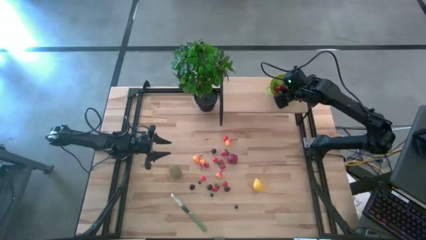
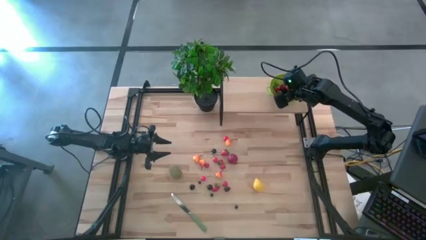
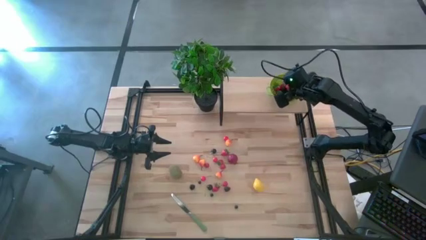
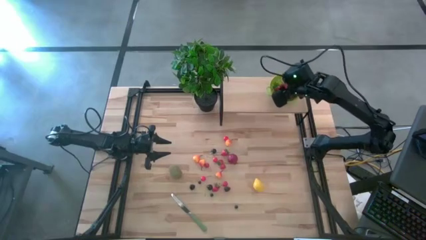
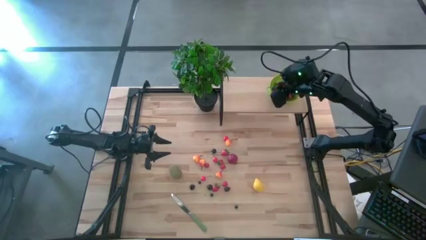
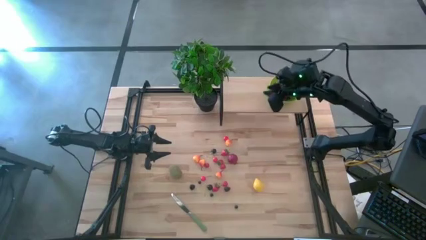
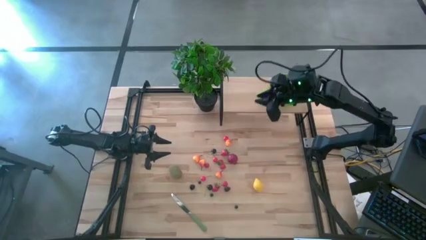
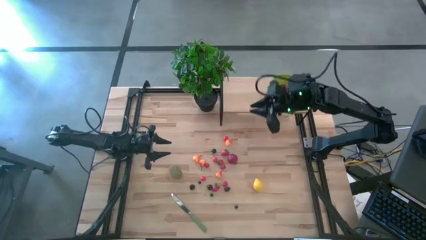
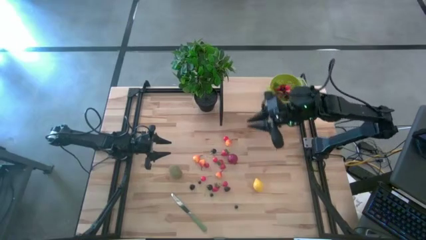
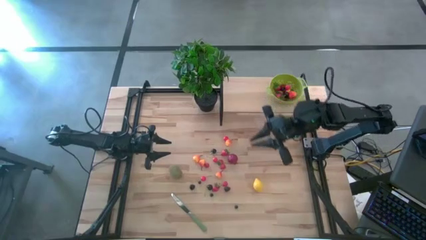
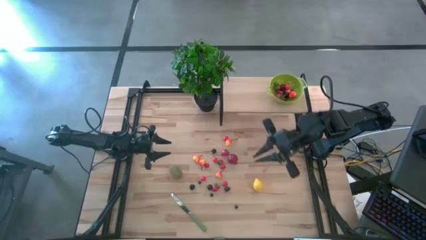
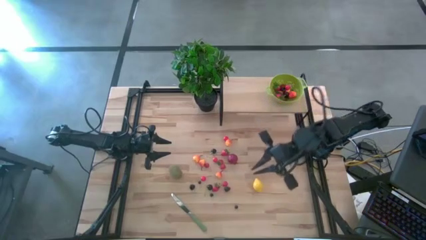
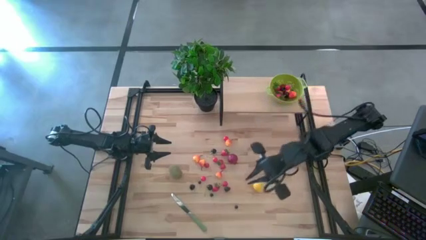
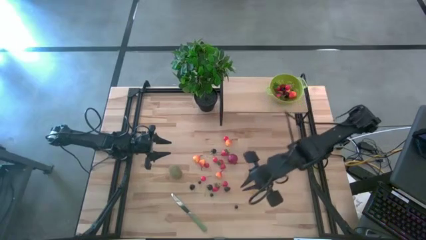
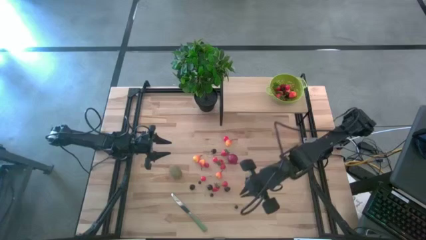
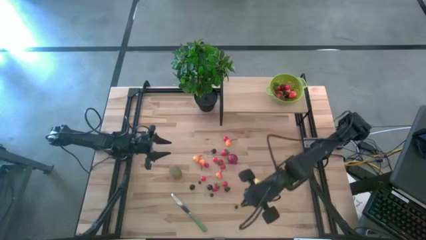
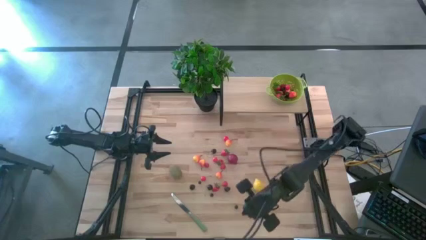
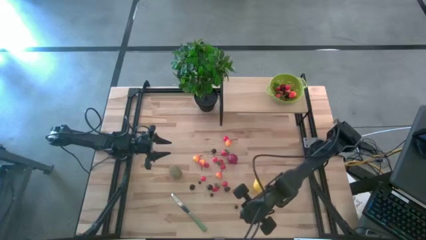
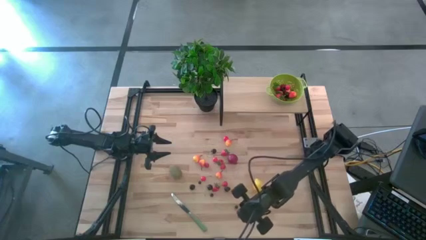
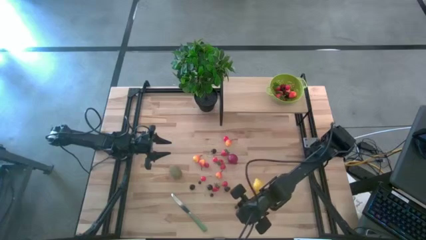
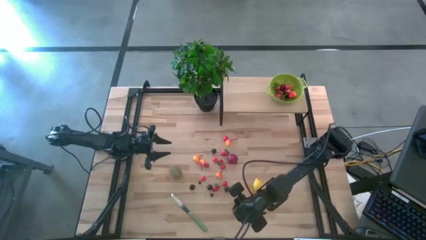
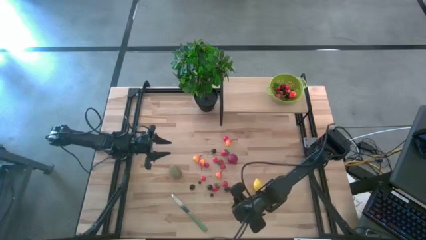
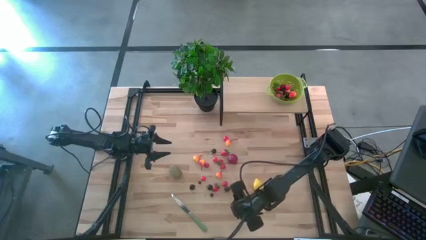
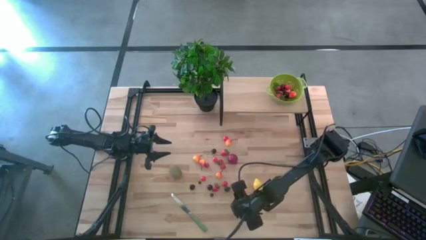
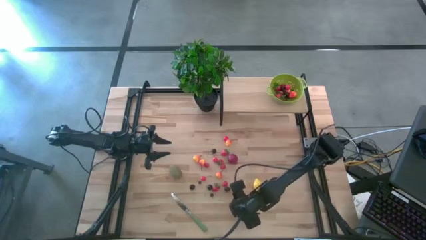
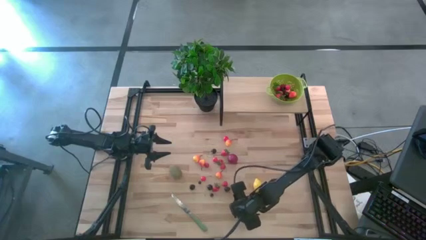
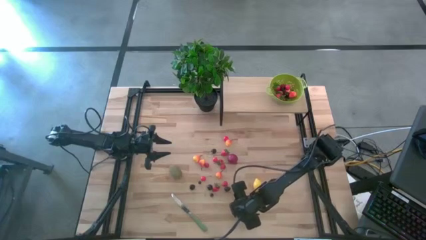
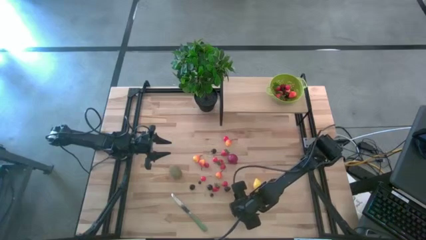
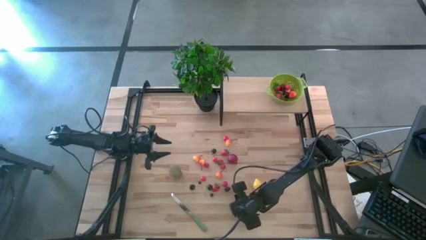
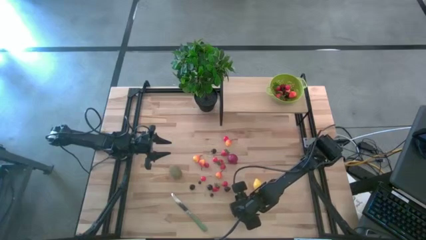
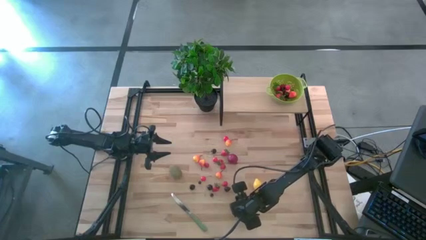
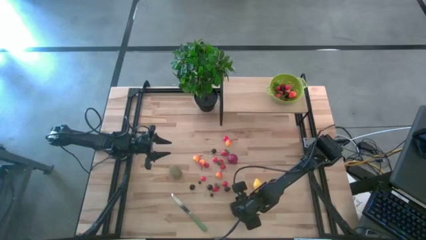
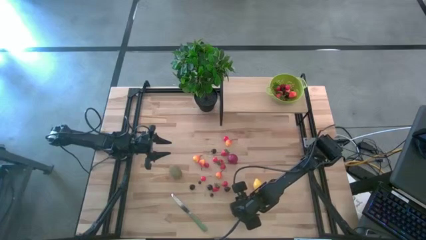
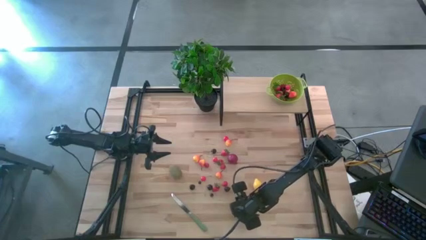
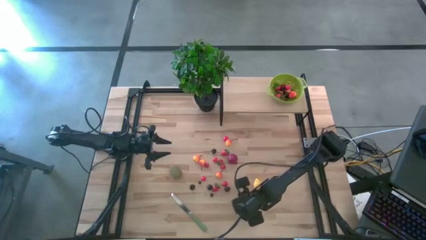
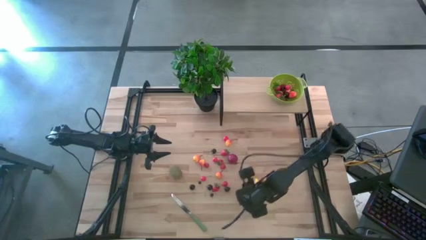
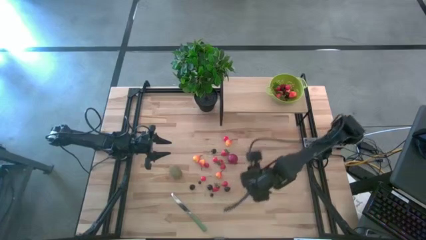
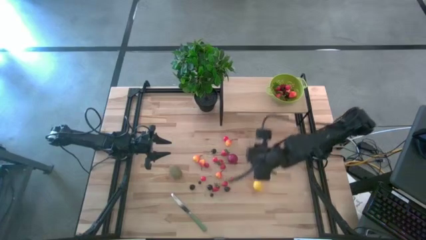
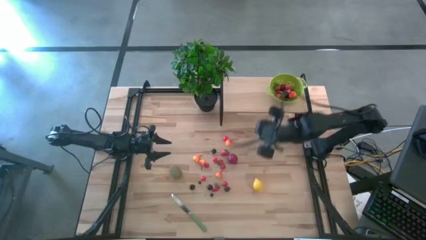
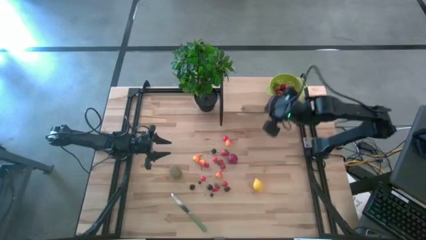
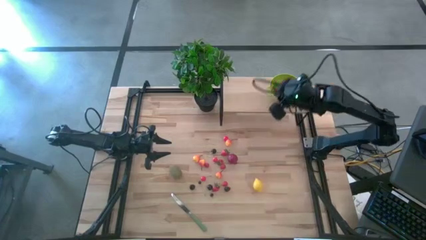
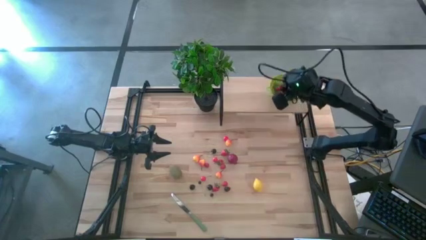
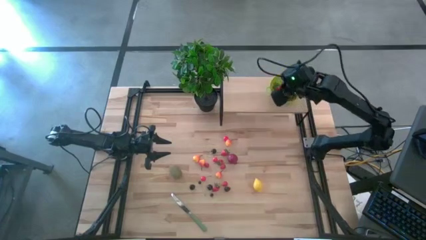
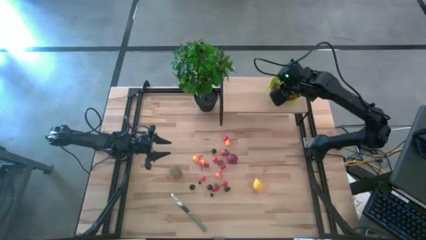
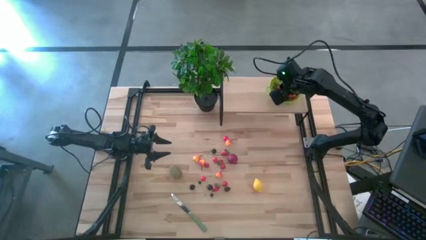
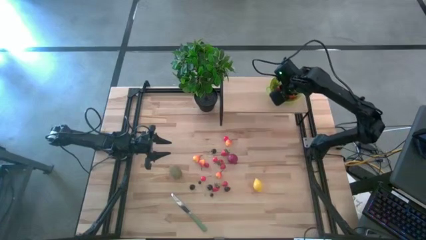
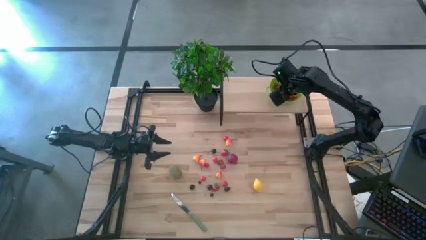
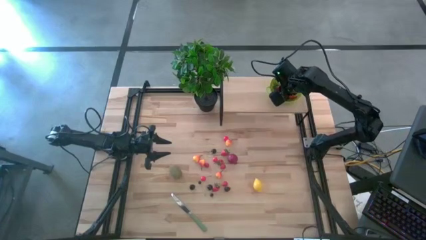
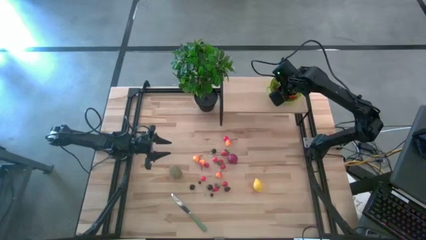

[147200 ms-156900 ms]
Task: Pick & Place Fruit
Put the blueberry into the green strainer bowl on the shelf

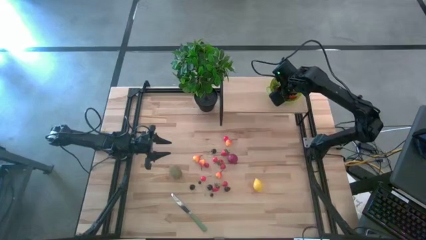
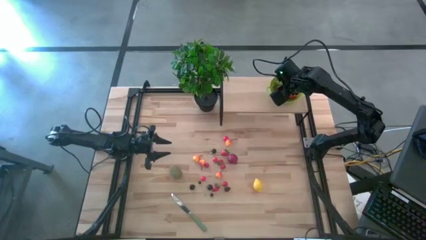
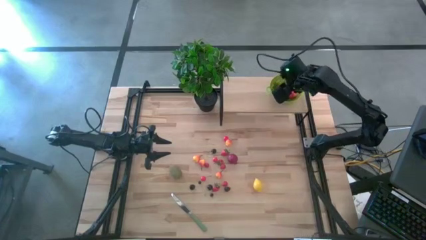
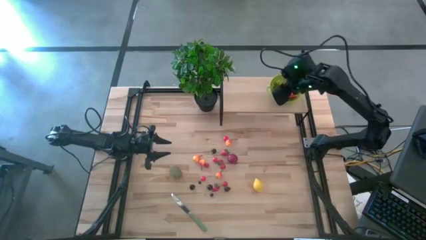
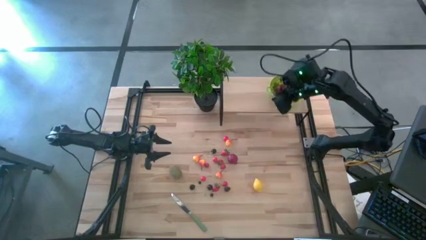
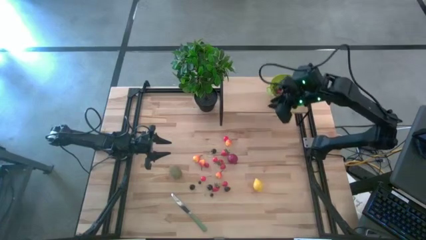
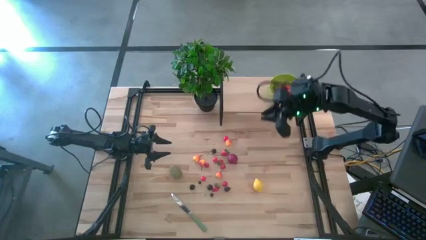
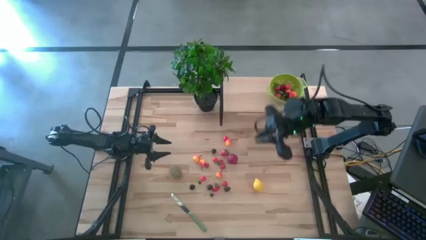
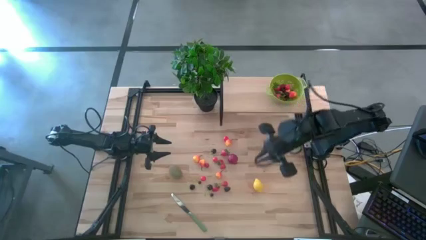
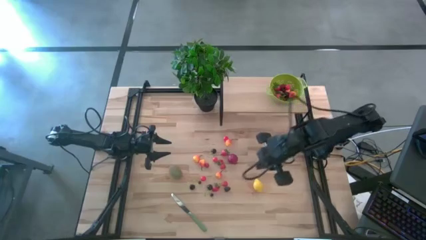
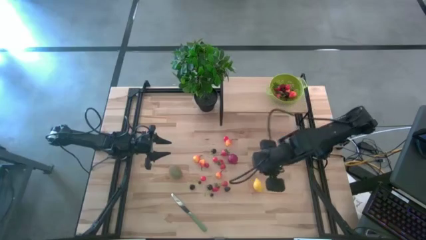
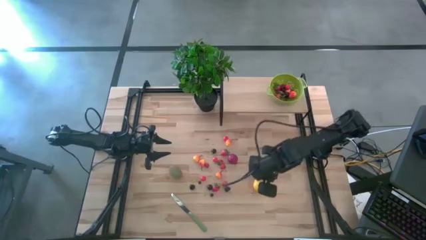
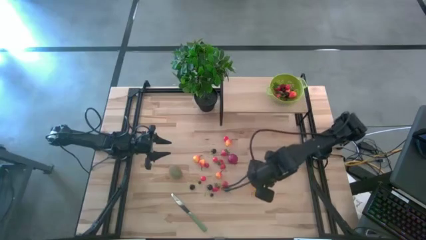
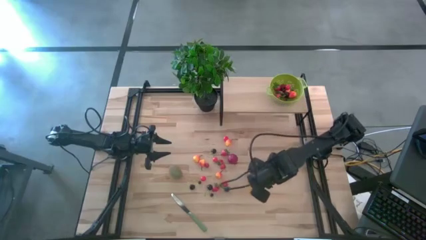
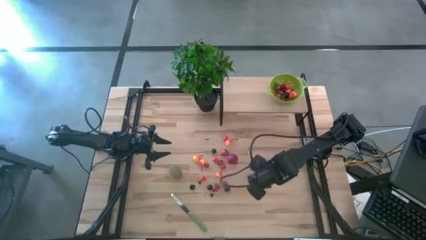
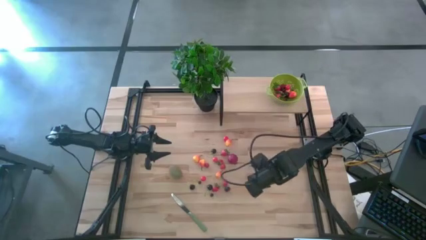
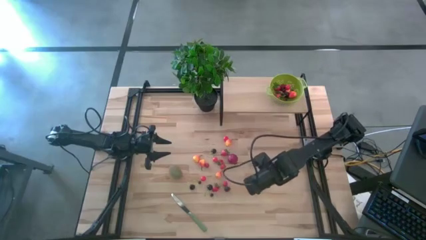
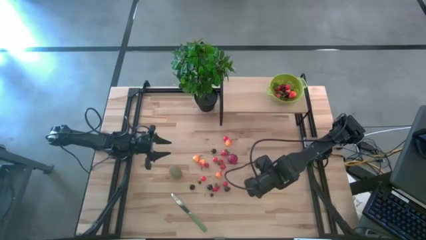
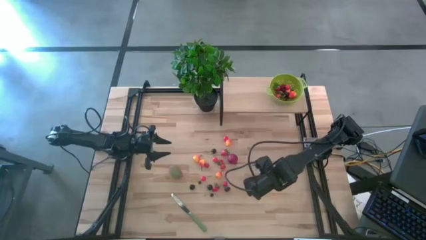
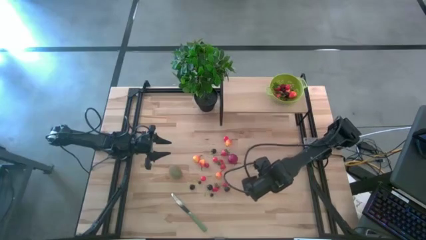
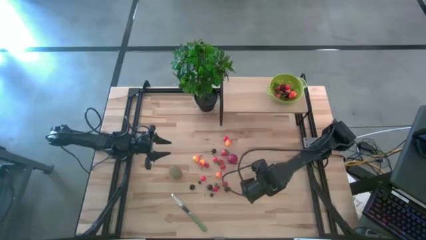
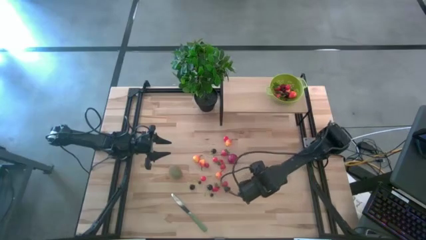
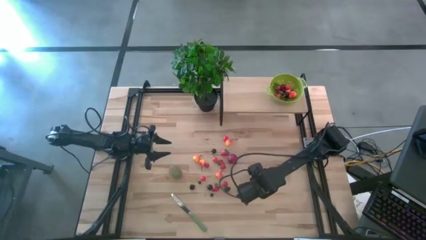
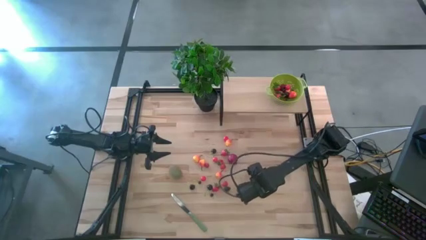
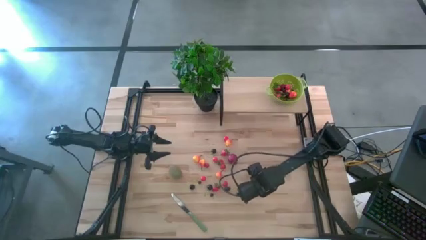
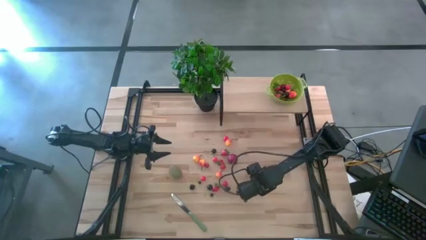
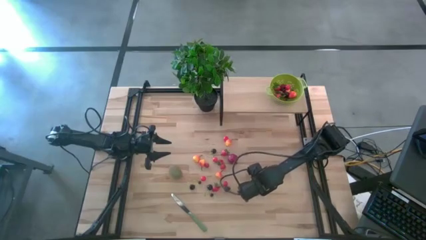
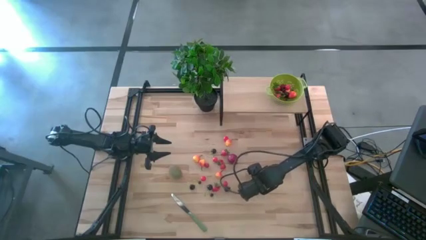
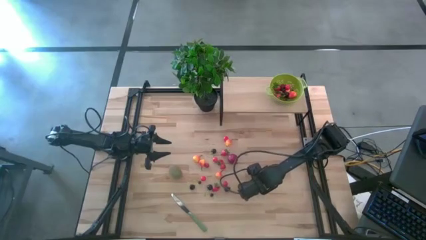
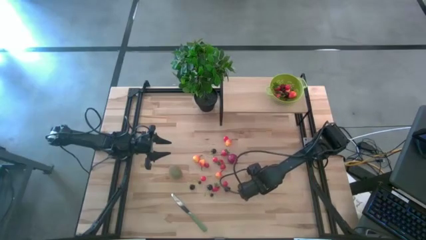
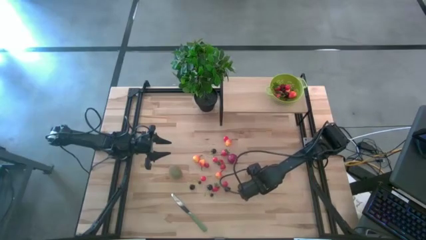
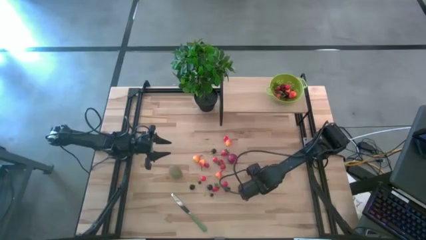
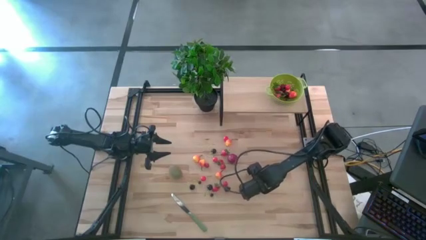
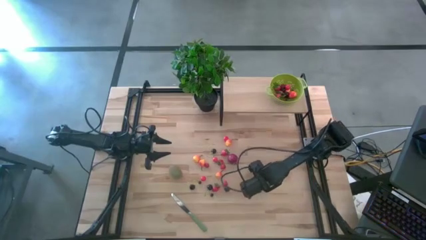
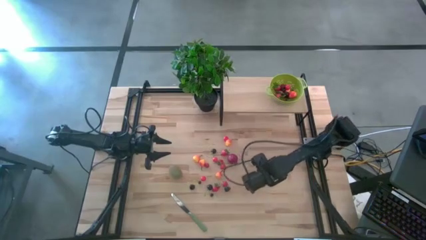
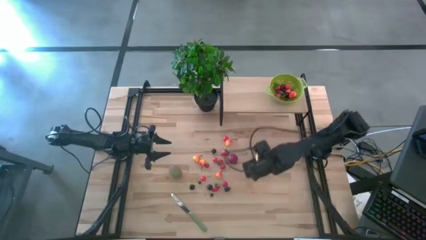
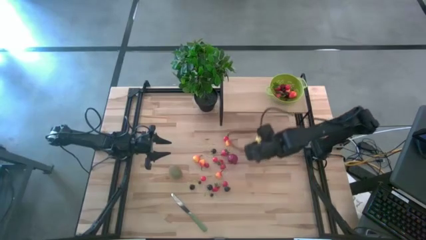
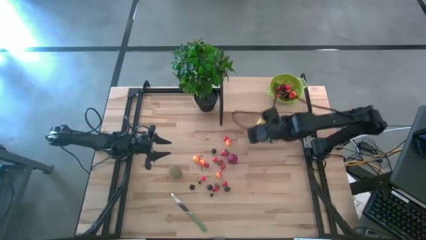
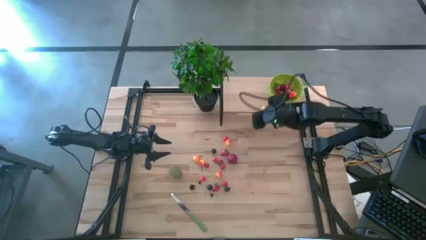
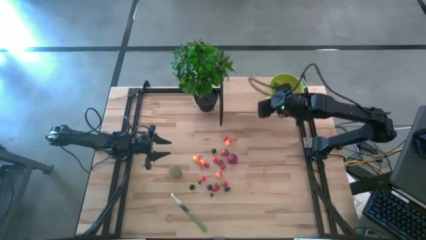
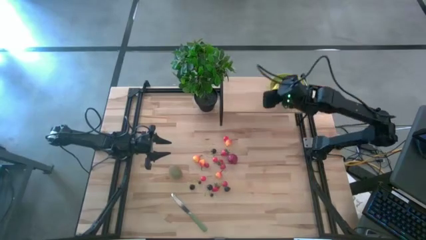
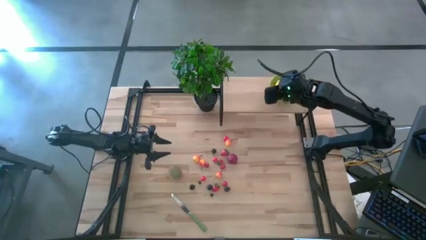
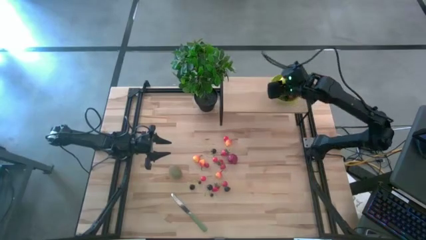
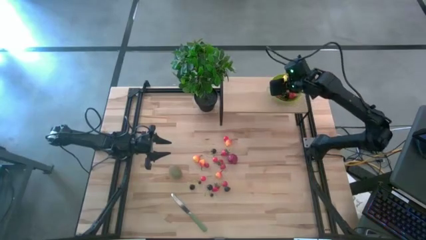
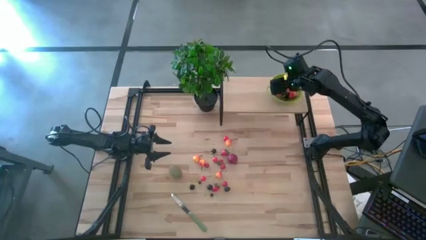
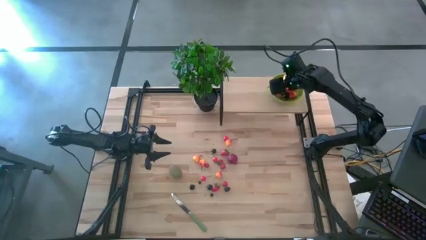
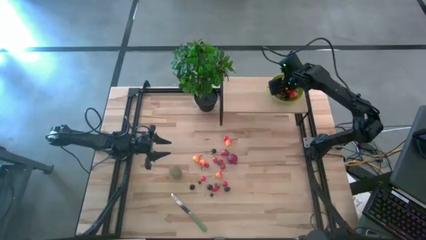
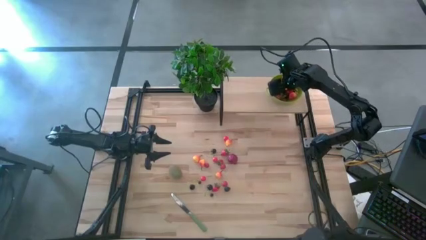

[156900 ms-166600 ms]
Put the lemon into the green strainer bowl on the shelf
